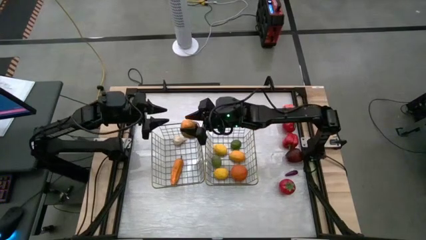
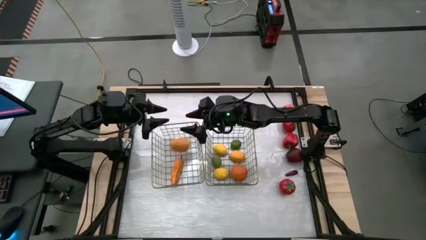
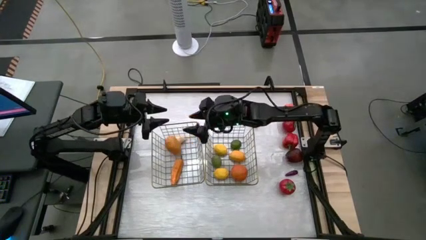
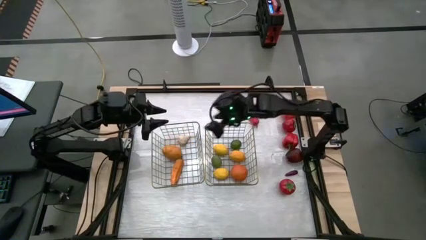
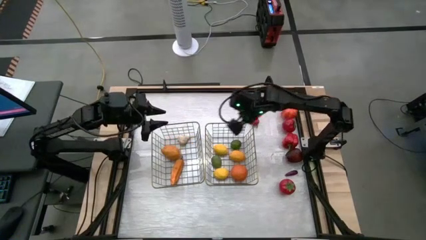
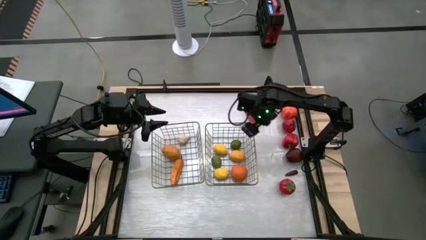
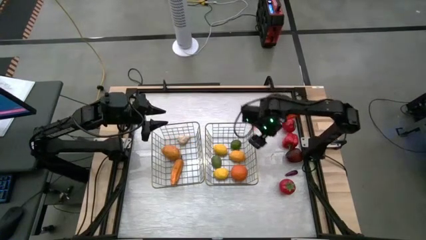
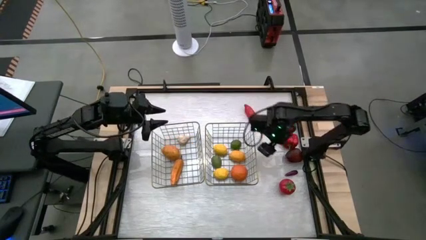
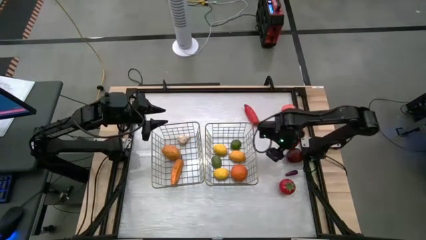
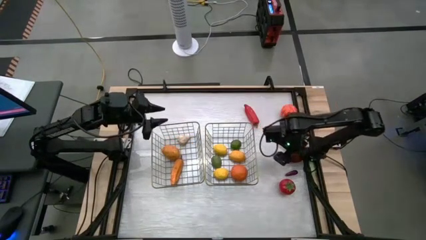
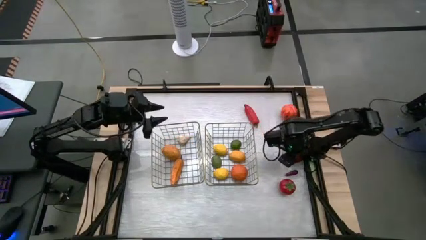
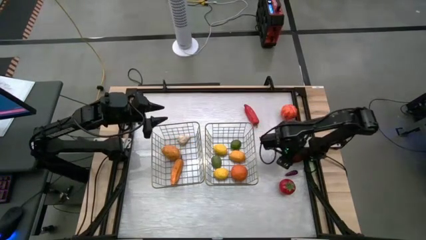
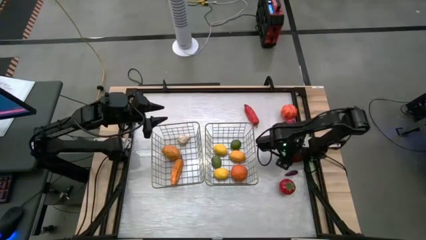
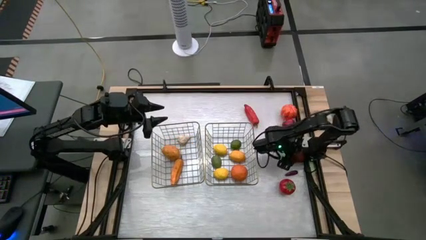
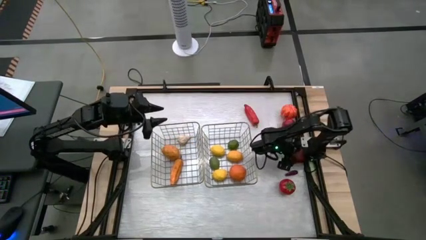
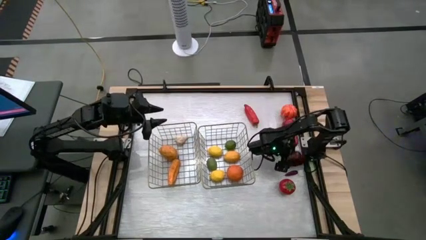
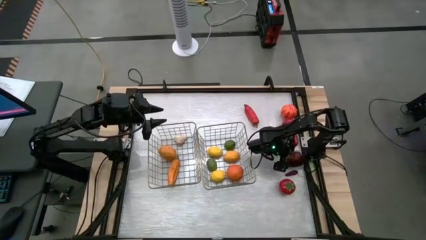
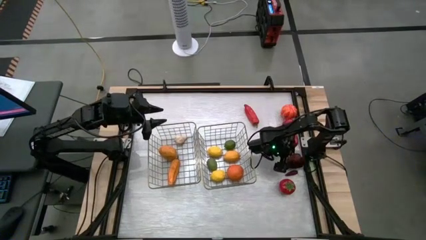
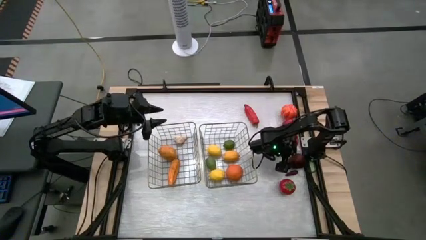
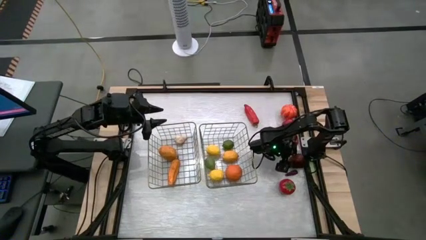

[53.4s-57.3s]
Task: Sort produce into baskets
Put the red apple into the right basket

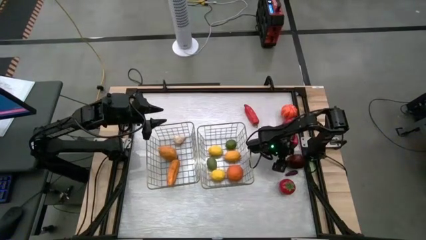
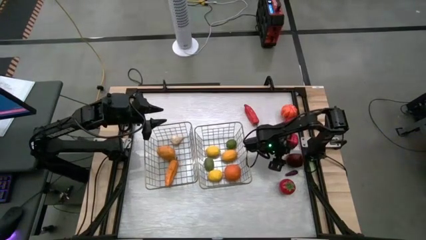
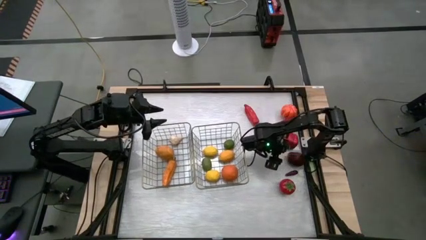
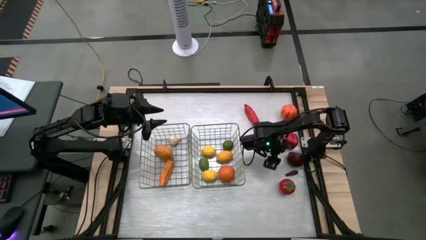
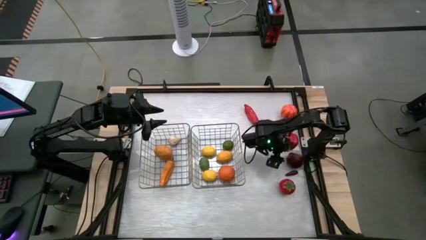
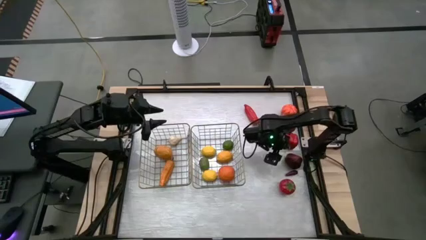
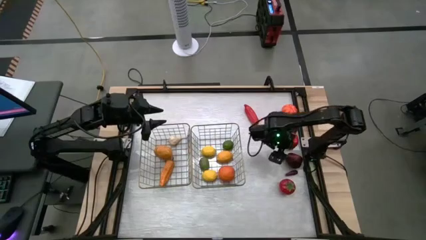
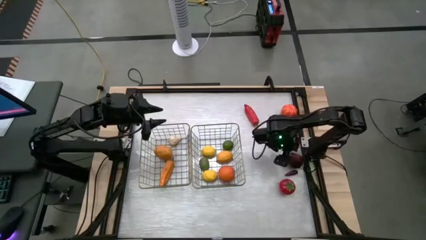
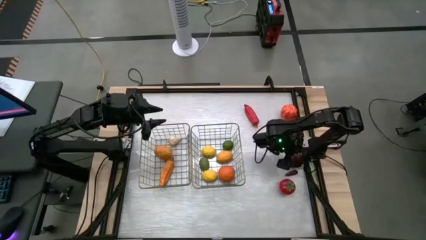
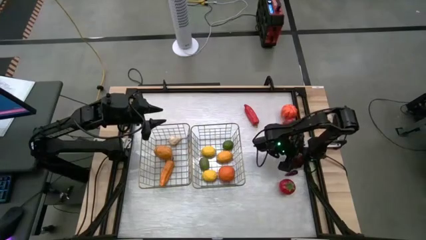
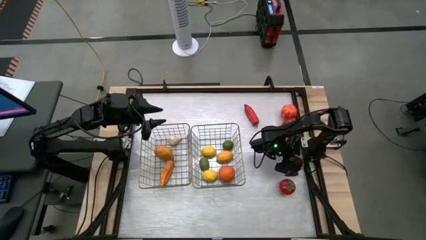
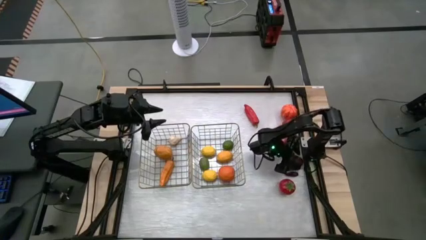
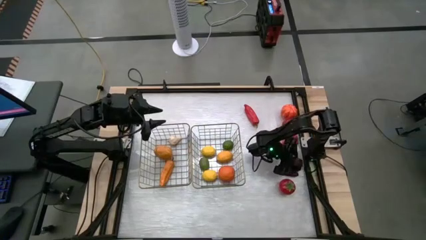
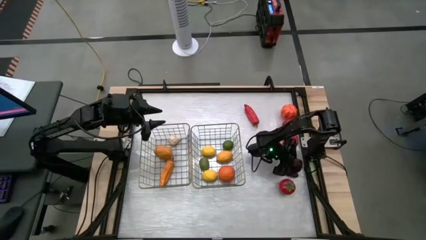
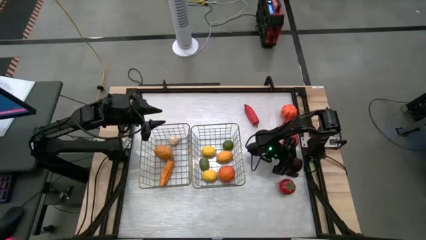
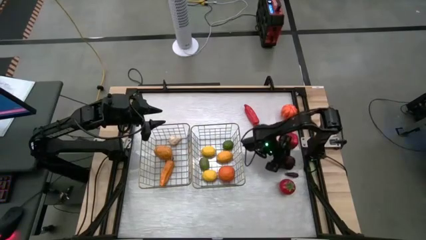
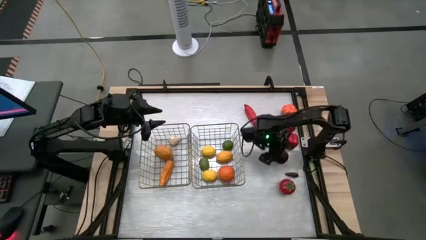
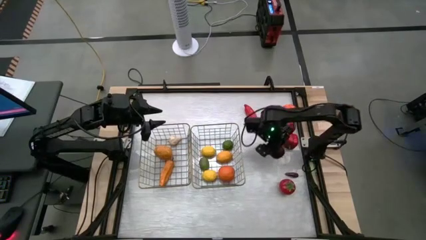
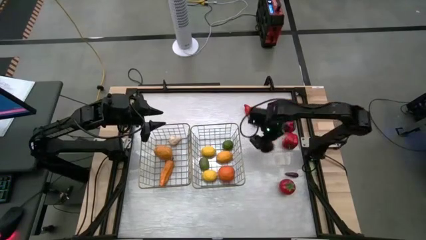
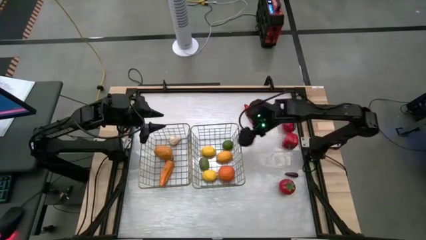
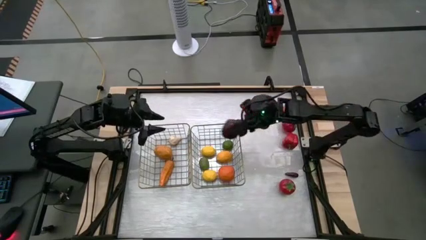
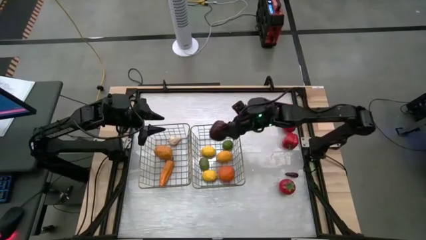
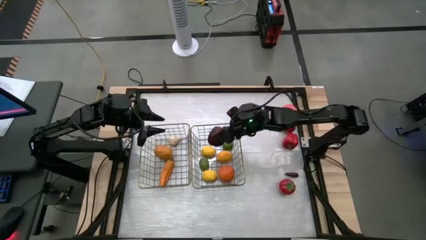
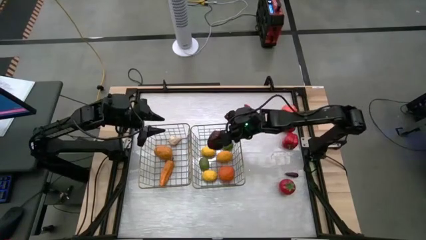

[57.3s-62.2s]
Put the red apple into the right basket

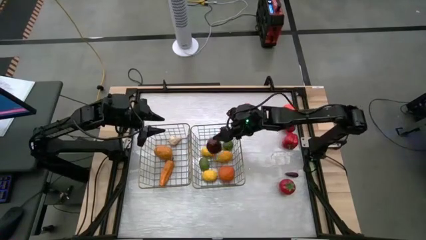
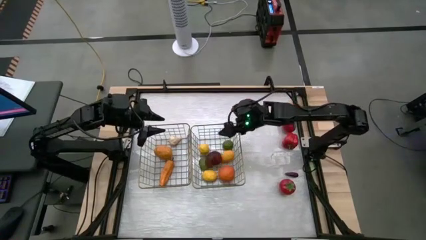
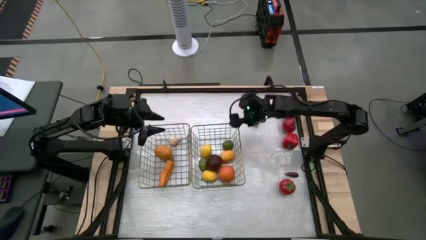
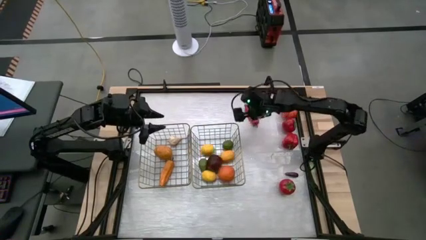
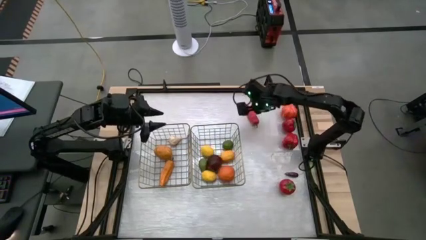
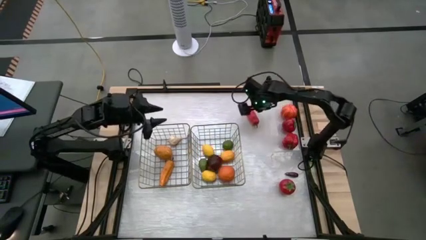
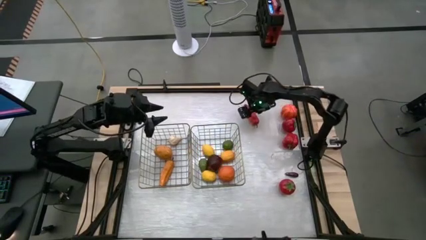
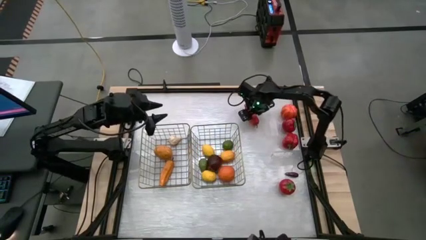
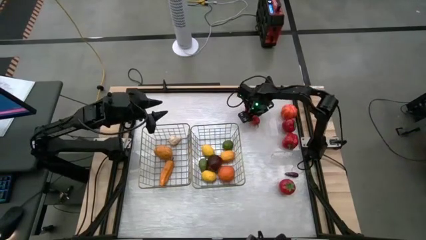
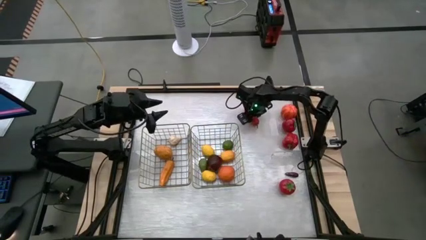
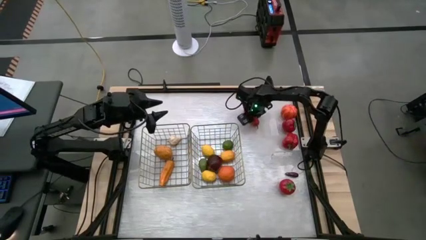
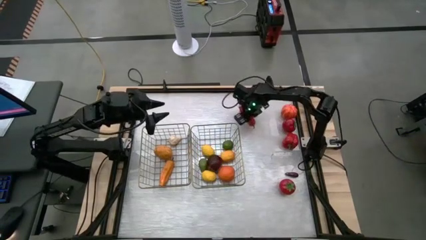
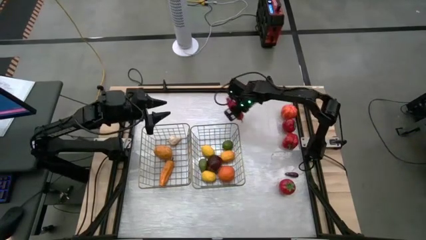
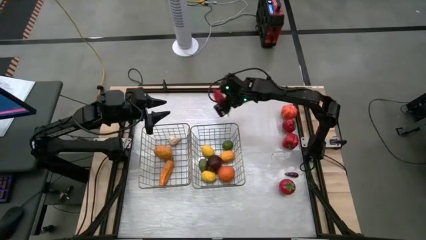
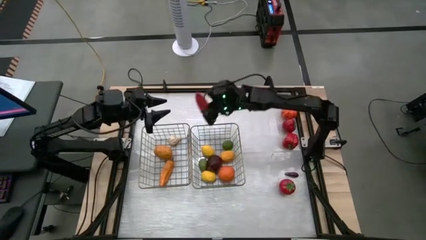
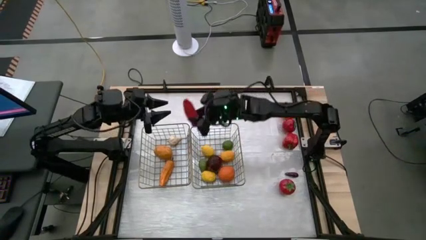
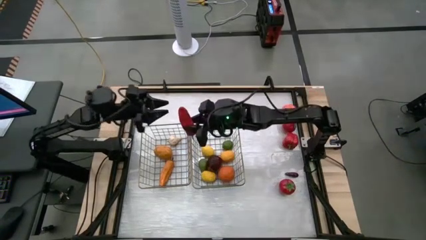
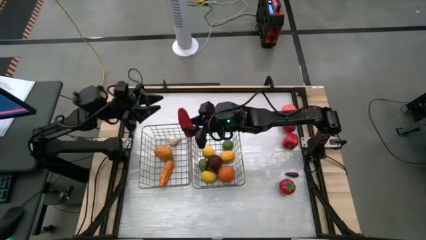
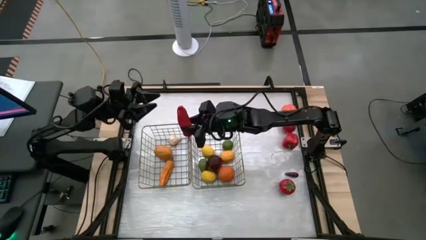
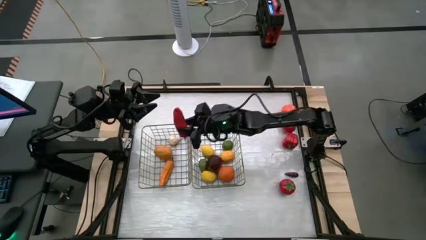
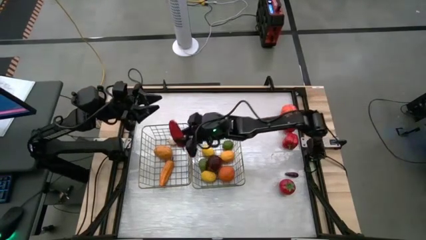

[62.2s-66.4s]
Put the red chili pepper into the left basket

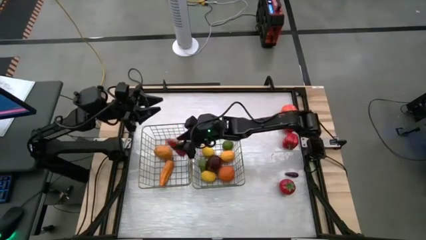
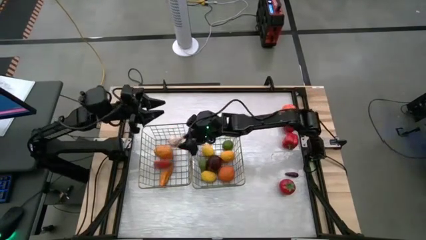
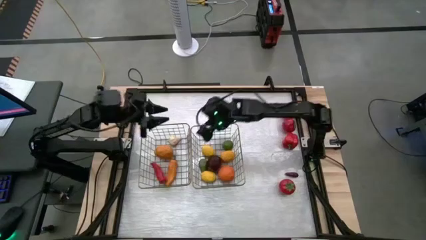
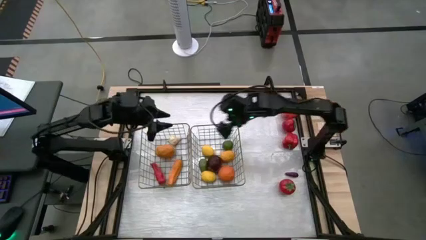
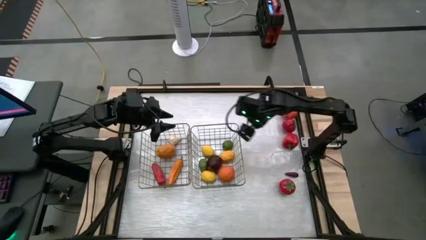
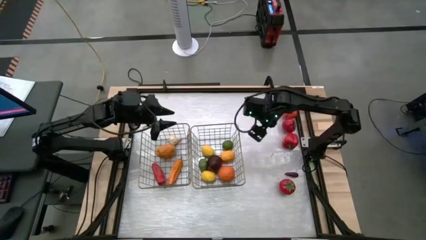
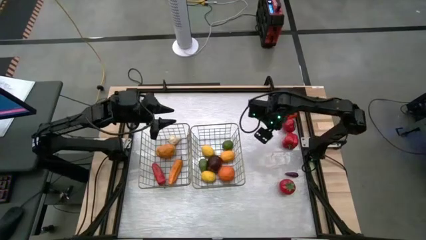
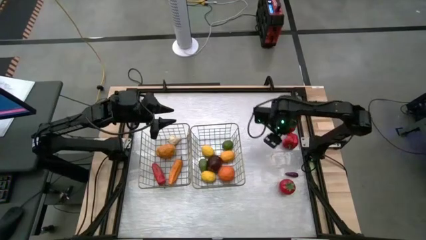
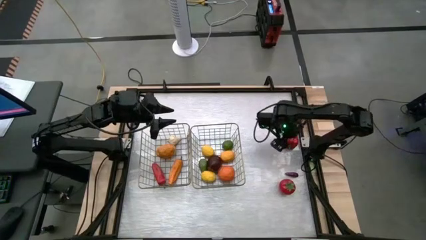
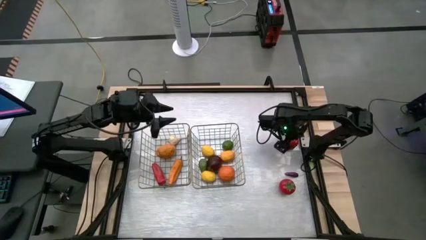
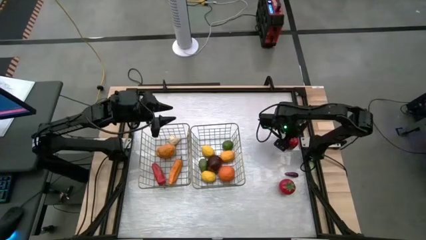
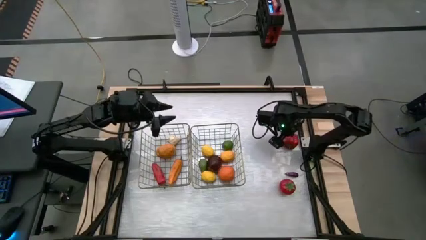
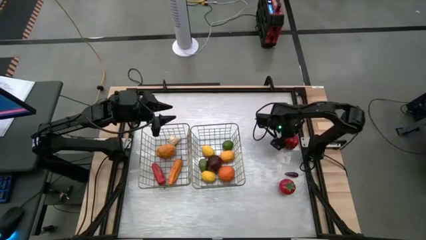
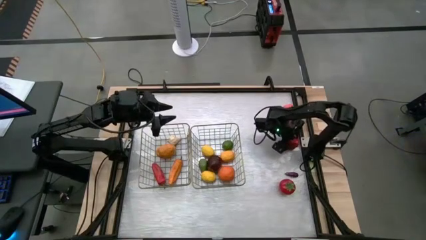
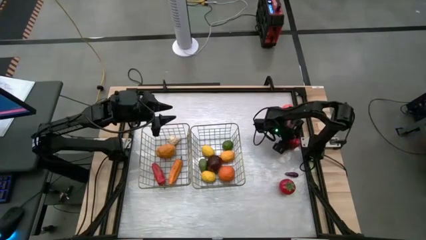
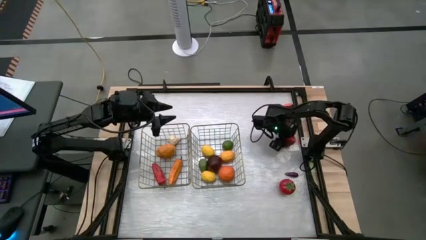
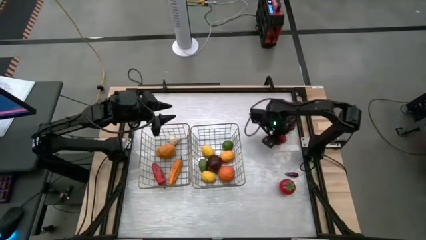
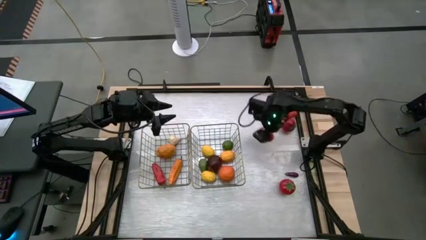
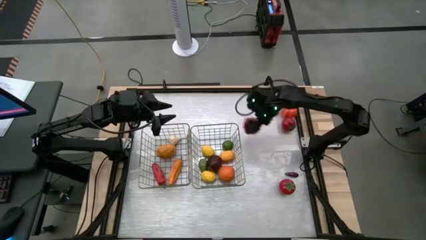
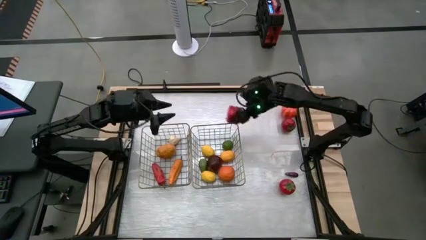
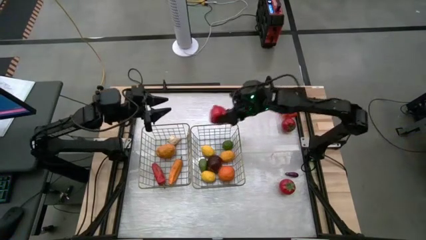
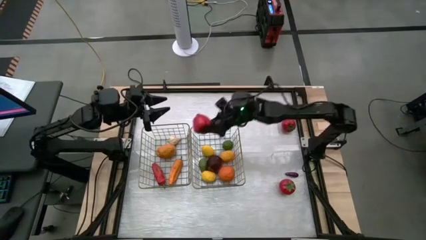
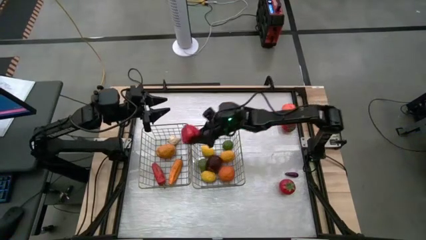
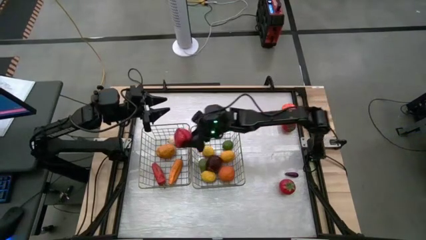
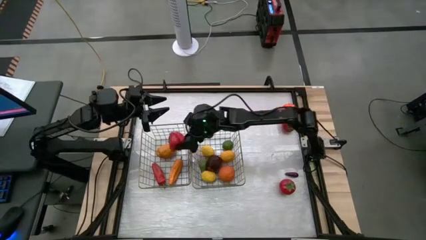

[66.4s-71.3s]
Put the red bell pepper into the left basket
